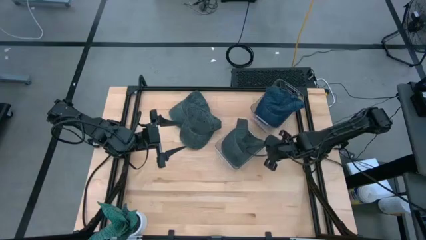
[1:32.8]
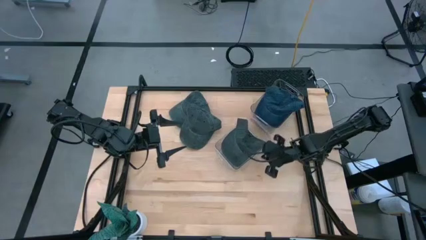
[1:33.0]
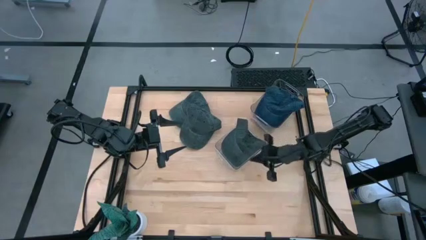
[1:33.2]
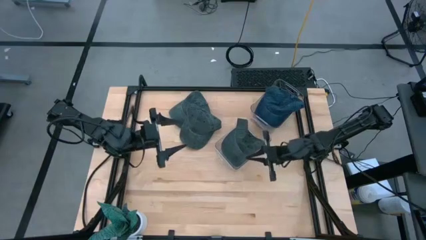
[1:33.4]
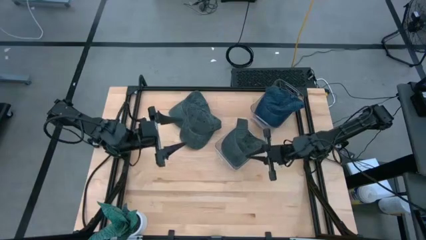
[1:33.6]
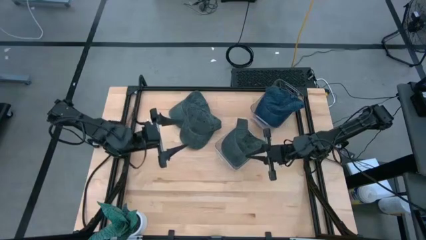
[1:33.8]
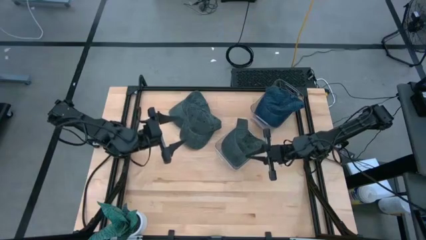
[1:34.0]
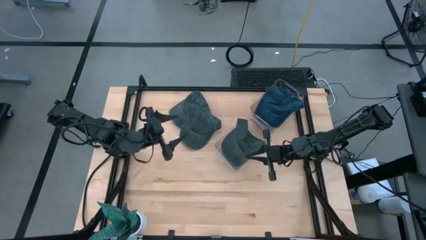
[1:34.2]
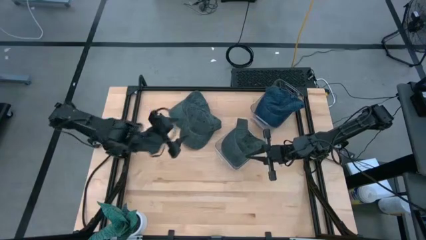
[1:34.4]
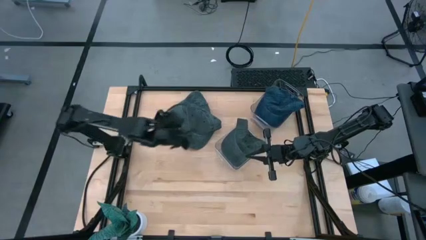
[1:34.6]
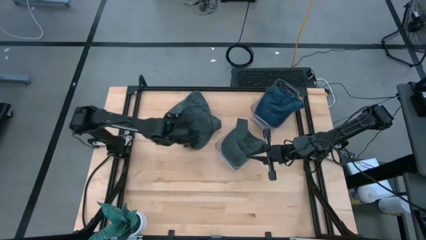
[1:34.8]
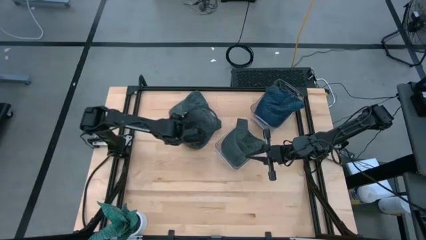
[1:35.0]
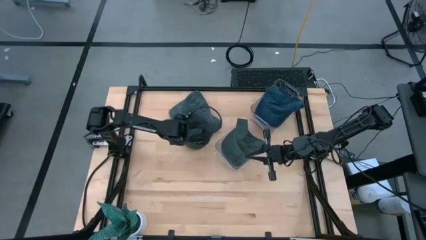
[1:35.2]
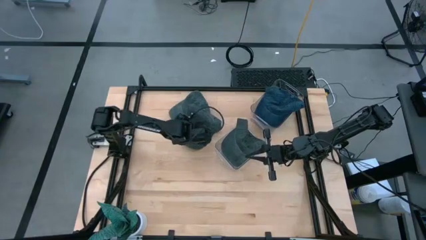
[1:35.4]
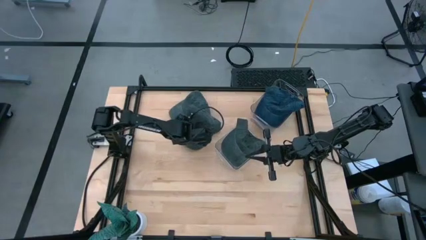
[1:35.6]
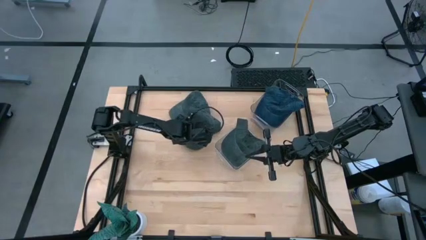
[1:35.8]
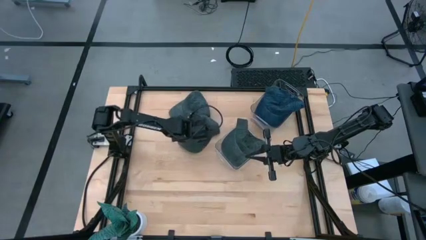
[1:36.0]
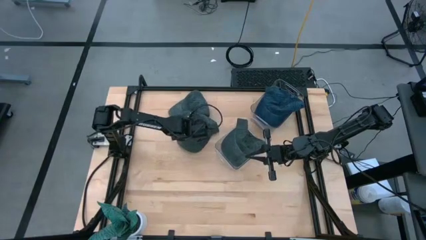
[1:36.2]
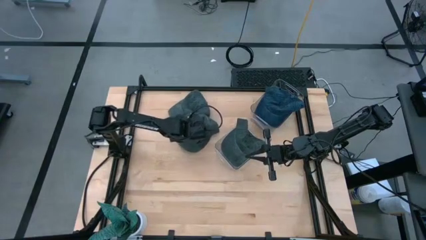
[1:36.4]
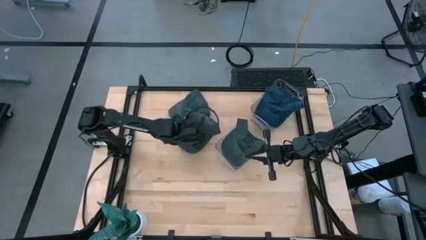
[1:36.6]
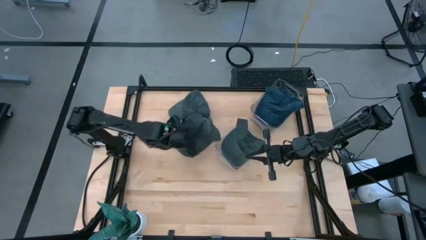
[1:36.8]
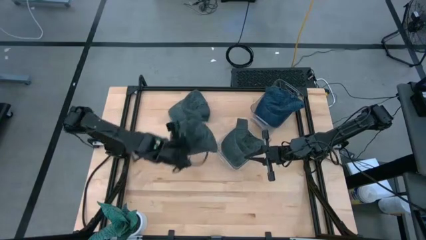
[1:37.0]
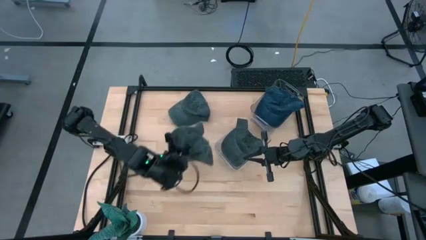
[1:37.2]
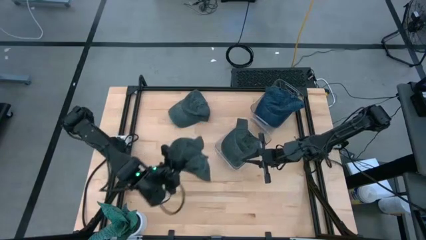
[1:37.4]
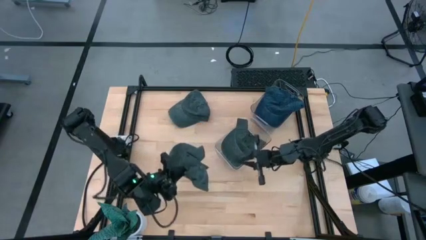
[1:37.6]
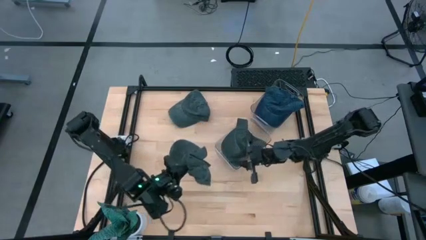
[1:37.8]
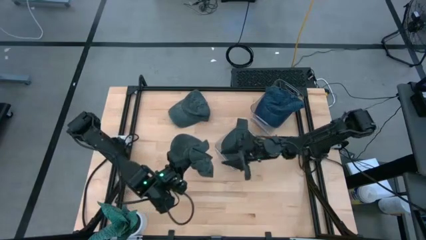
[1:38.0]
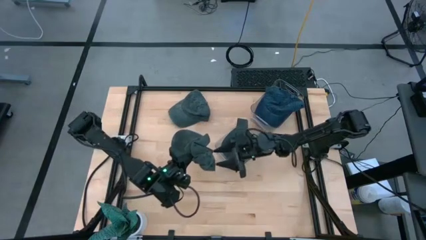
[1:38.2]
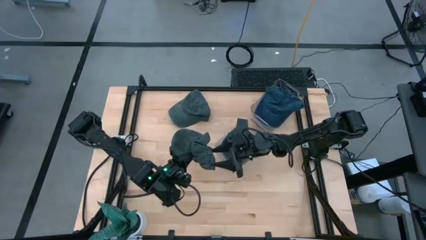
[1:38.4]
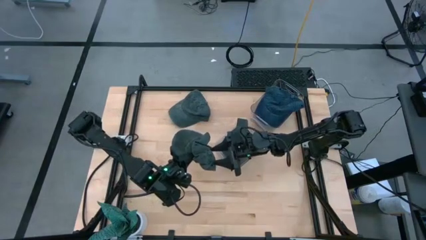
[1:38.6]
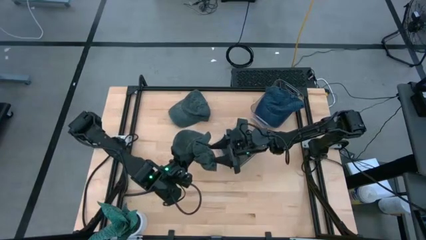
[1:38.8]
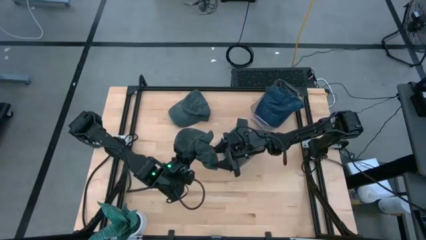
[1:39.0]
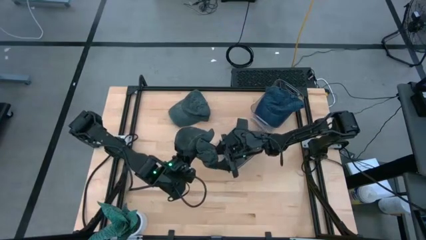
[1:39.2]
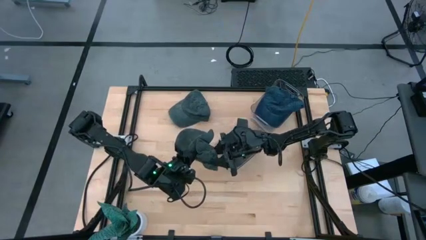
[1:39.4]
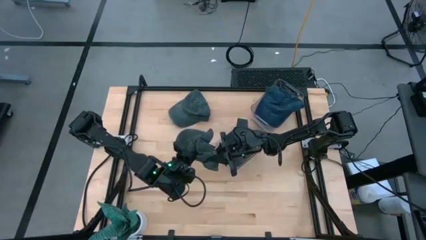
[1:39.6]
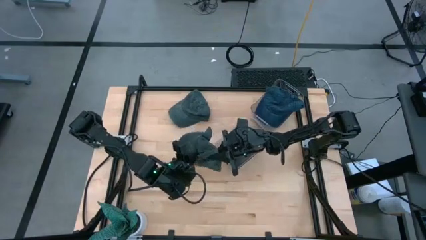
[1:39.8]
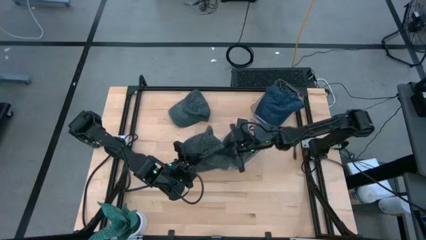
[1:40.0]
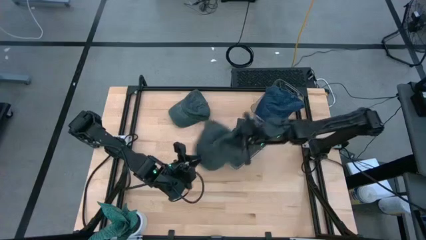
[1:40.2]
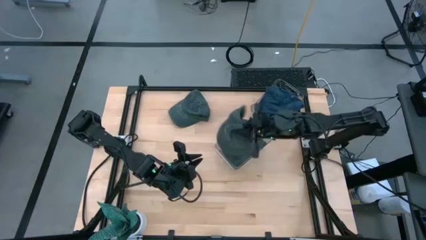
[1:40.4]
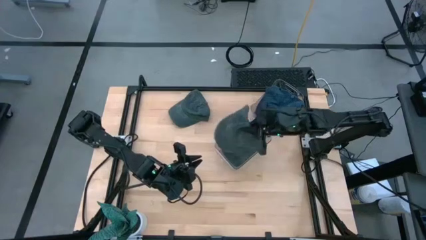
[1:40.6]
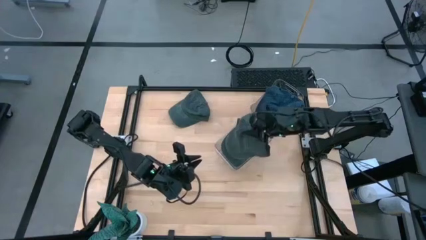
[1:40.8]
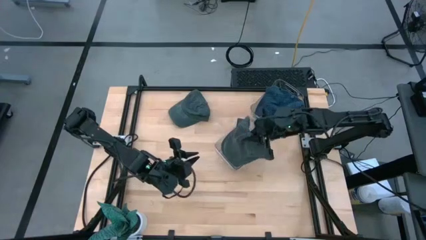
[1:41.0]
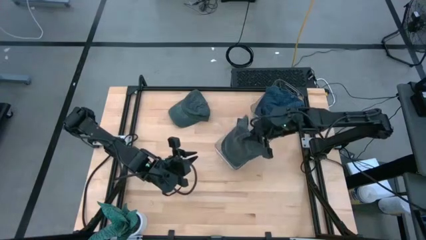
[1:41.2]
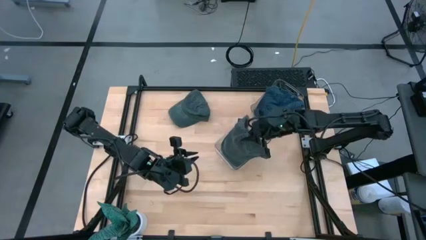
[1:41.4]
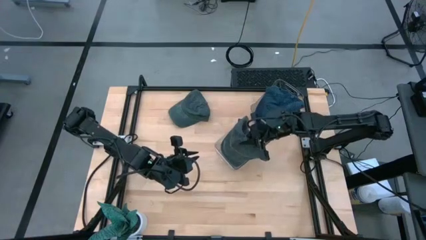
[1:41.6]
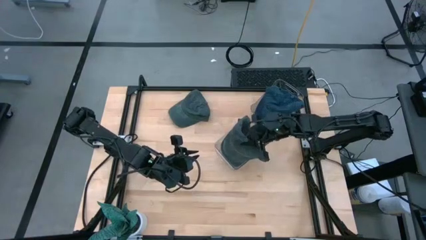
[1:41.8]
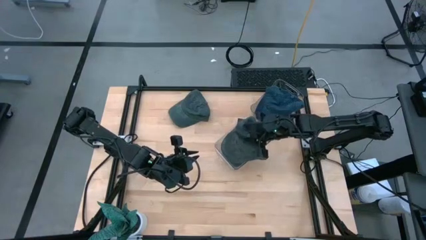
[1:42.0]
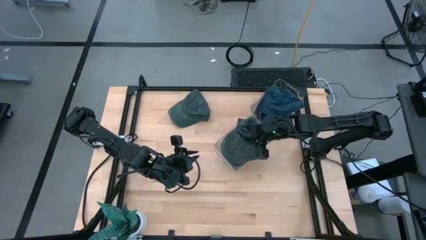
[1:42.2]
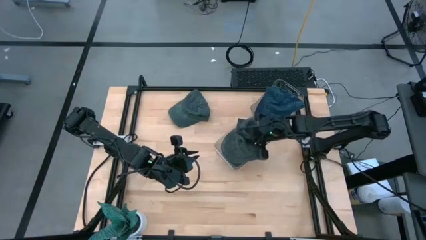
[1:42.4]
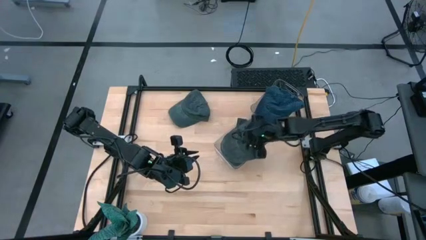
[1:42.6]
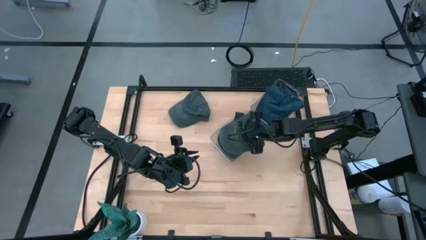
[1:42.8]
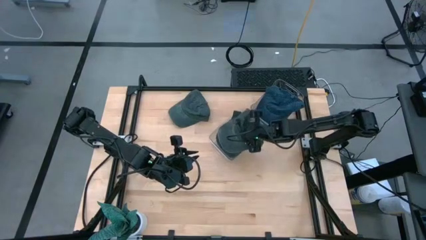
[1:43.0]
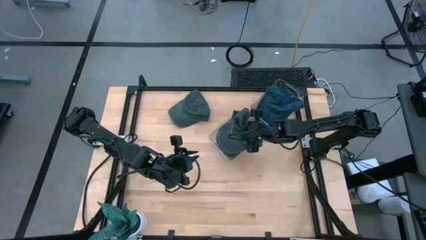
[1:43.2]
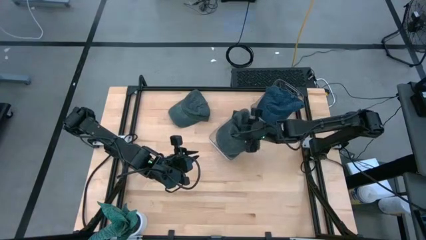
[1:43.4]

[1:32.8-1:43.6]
Task: Pick & Place hat
Put the bottom gray cap into the bottom transparent bin

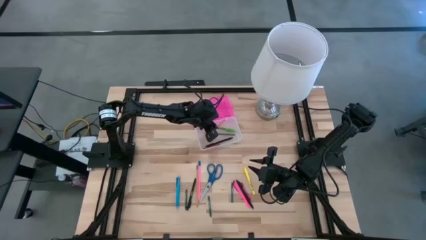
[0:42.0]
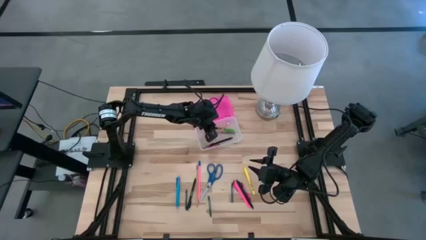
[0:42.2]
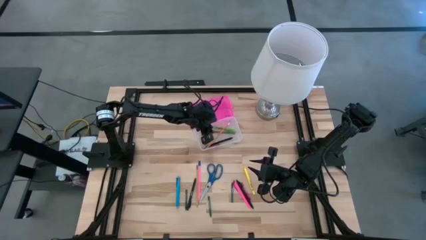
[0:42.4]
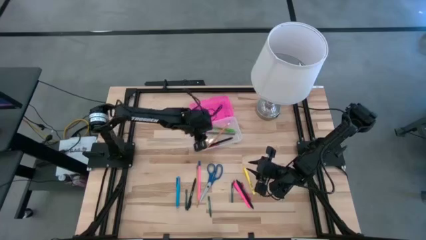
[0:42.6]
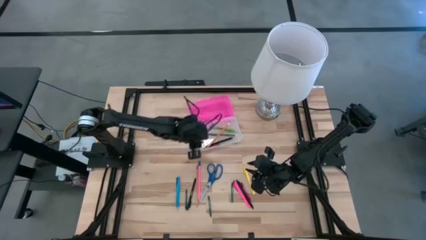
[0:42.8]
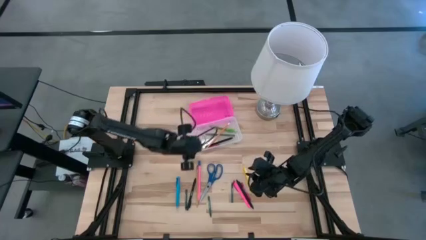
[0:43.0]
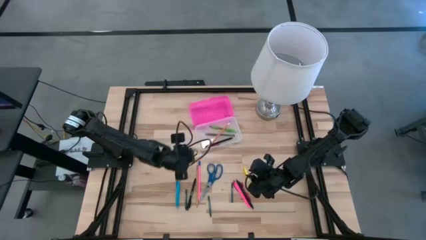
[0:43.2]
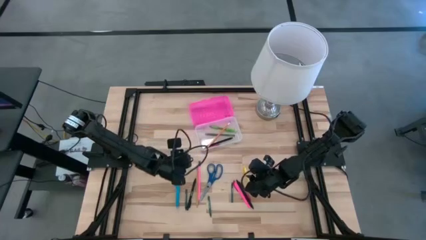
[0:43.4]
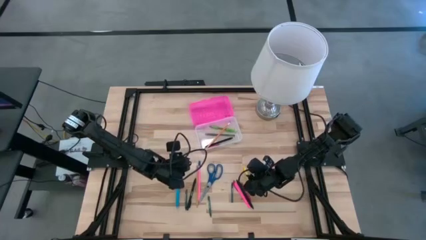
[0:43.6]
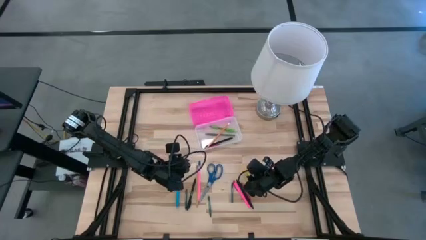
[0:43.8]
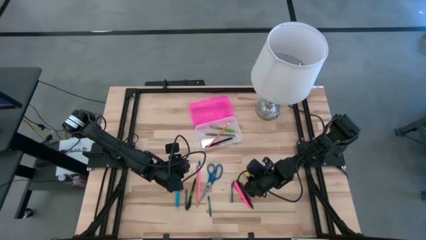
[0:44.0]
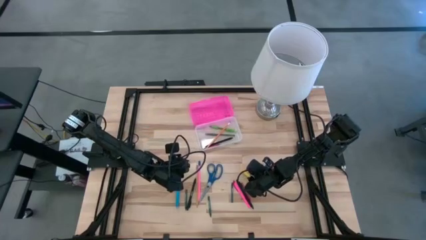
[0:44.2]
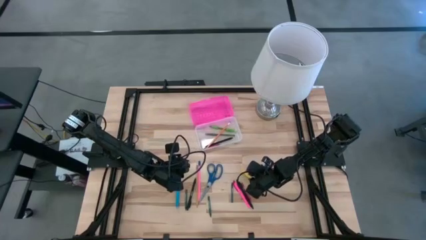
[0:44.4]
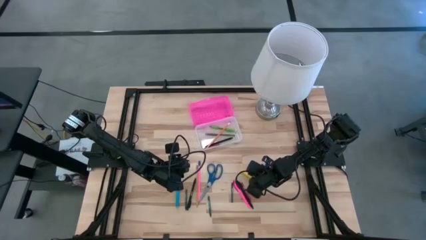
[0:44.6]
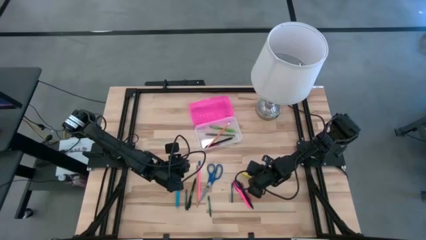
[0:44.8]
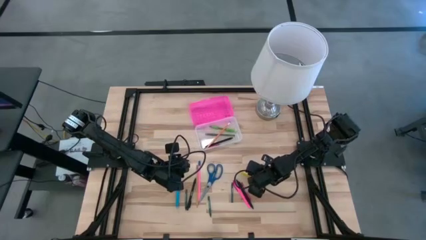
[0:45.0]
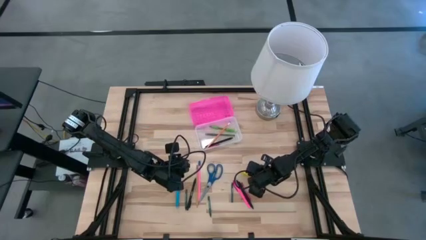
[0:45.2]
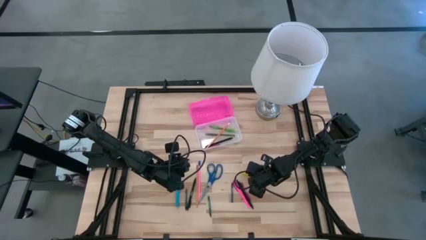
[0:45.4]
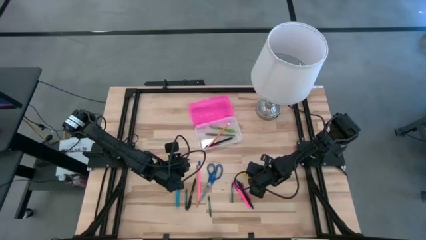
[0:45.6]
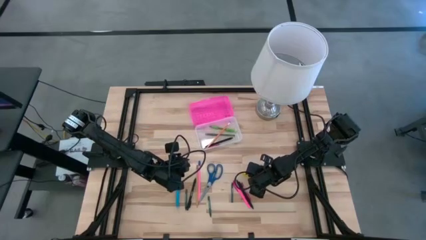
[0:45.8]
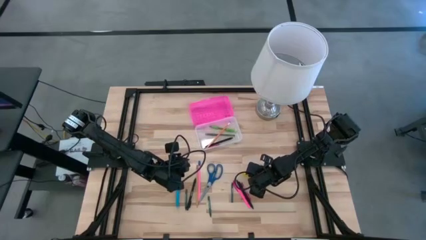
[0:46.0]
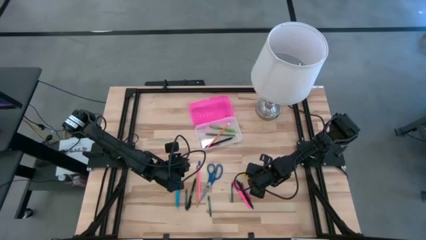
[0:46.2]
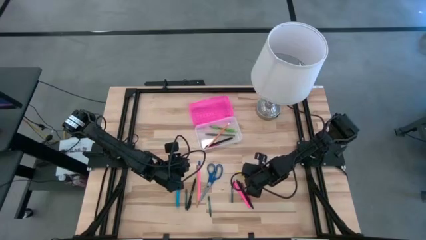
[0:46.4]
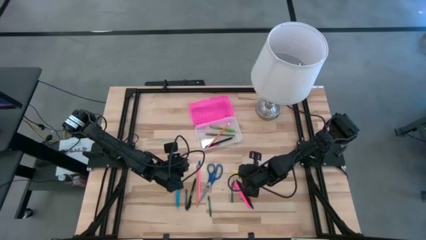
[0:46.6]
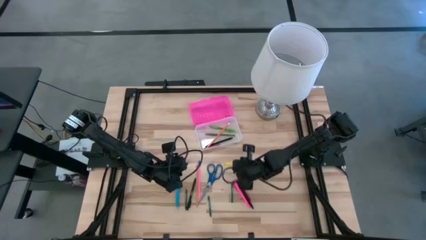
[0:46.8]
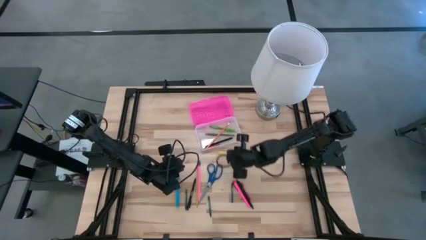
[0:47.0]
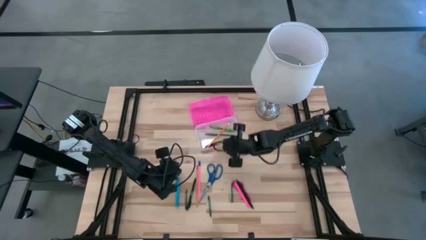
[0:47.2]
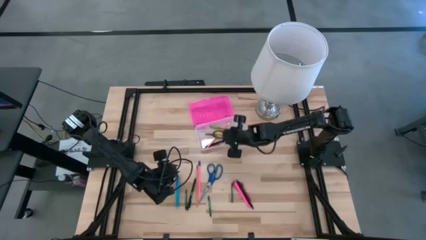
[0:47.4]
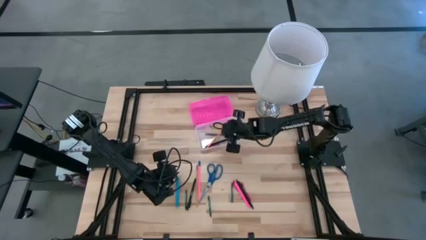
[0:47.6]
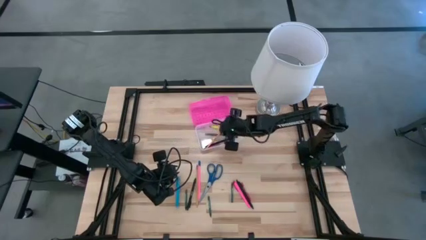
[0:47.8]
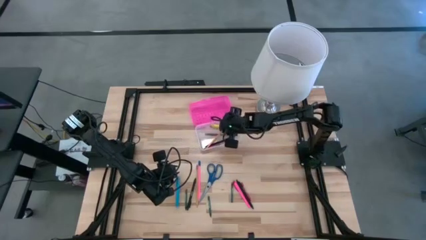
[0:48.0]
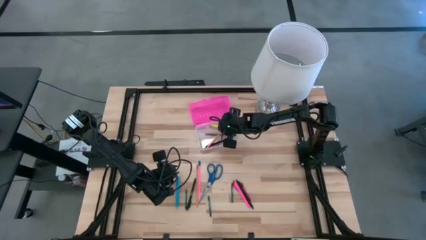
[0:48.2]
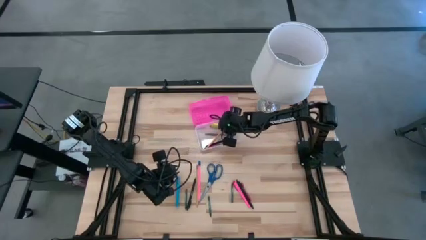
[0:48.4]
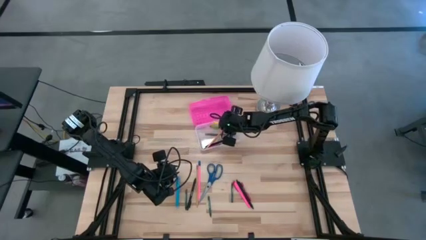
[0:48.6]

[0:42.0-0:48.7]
Task: Pick & place school supplies into a supply box
Put the yellow pen into the pink supply box
